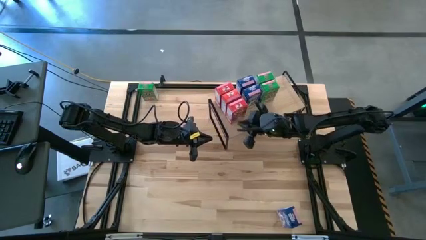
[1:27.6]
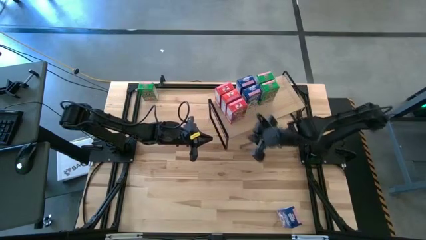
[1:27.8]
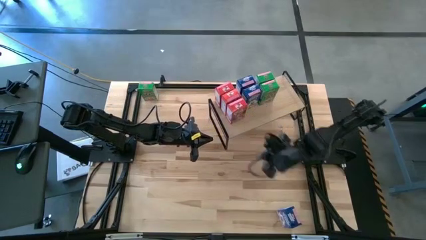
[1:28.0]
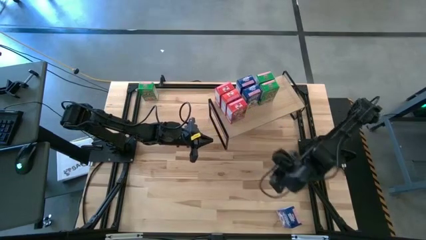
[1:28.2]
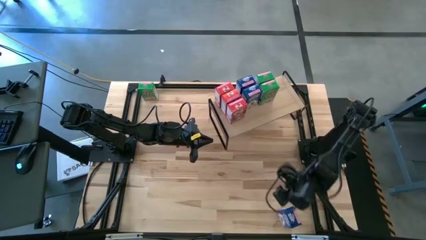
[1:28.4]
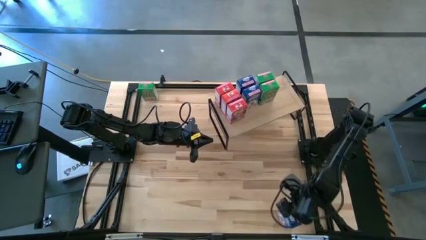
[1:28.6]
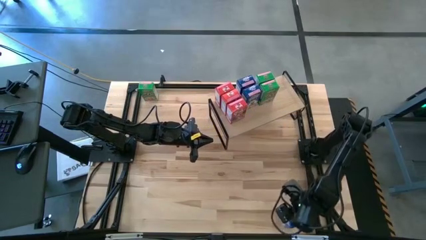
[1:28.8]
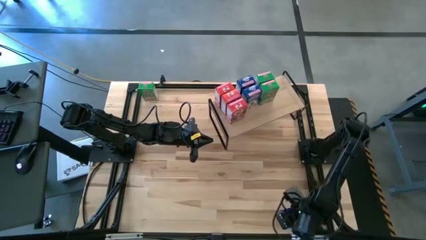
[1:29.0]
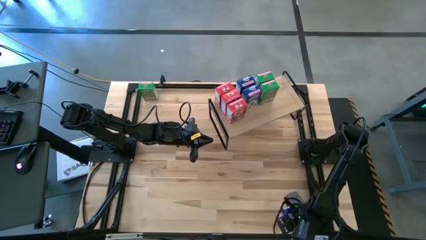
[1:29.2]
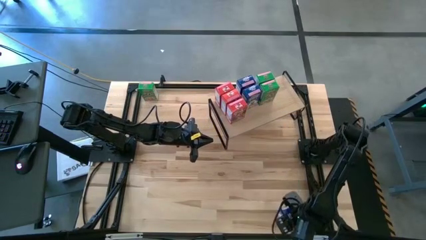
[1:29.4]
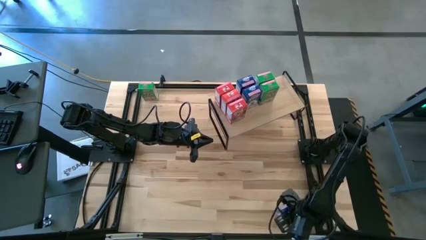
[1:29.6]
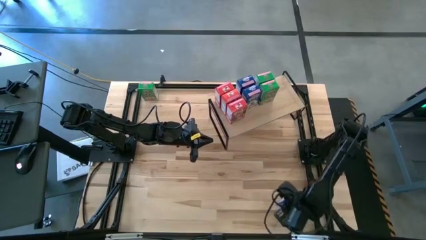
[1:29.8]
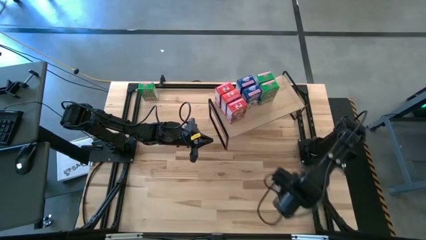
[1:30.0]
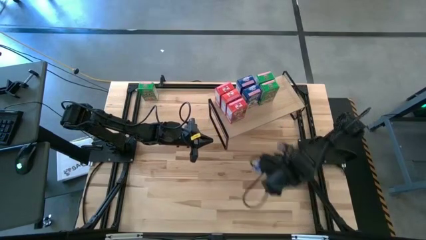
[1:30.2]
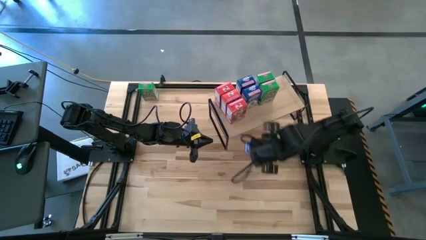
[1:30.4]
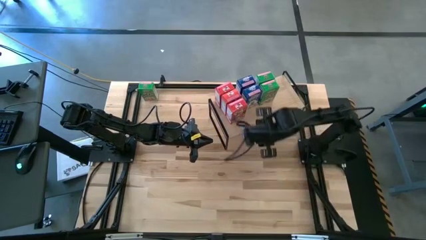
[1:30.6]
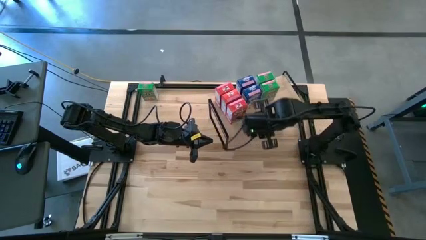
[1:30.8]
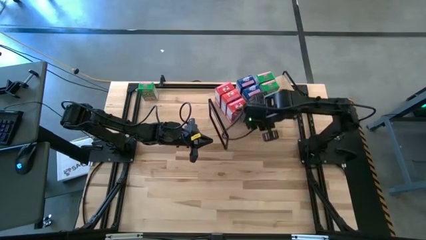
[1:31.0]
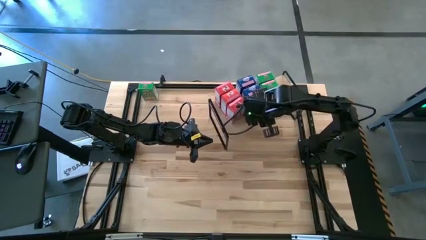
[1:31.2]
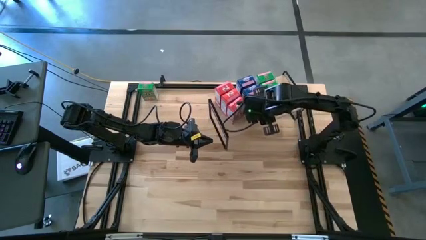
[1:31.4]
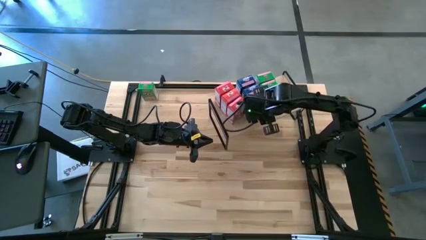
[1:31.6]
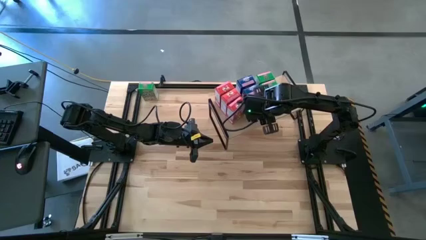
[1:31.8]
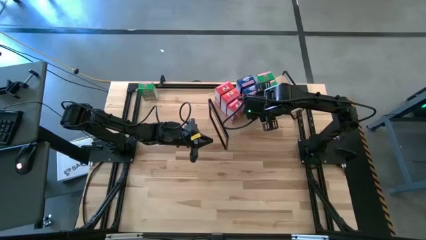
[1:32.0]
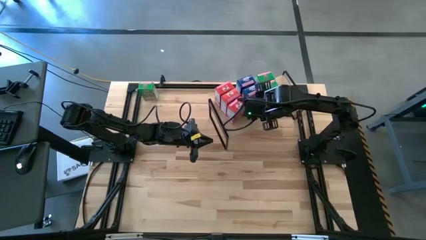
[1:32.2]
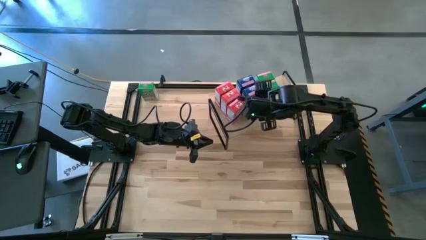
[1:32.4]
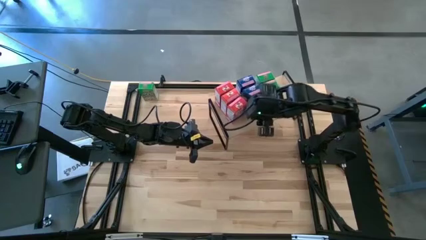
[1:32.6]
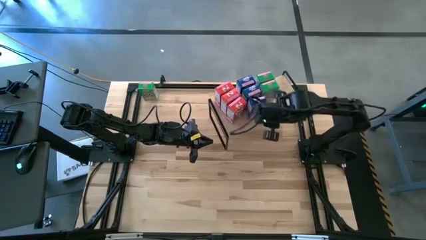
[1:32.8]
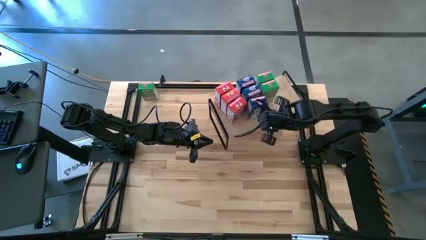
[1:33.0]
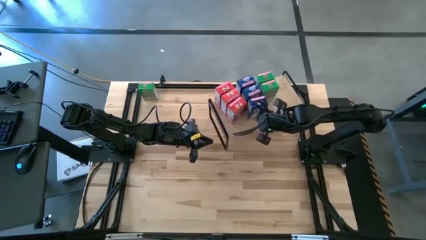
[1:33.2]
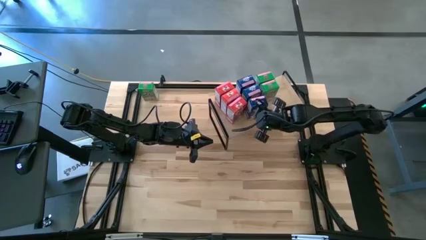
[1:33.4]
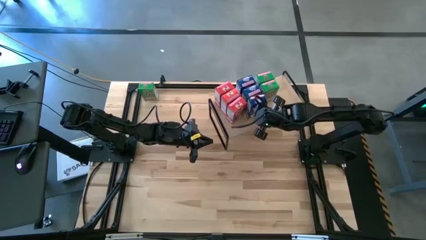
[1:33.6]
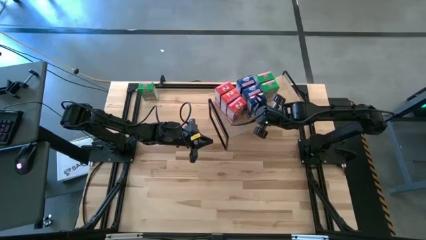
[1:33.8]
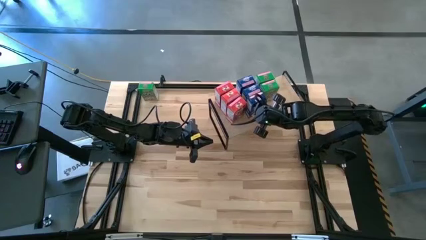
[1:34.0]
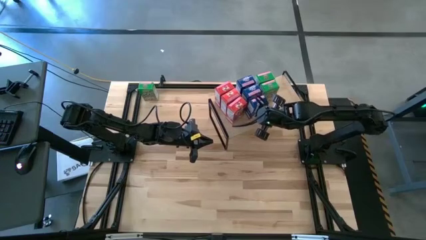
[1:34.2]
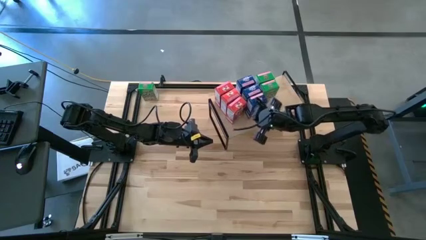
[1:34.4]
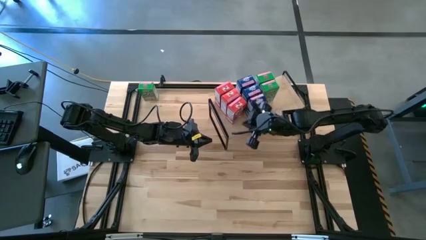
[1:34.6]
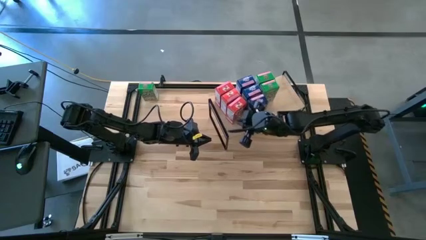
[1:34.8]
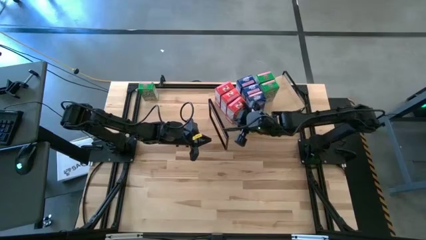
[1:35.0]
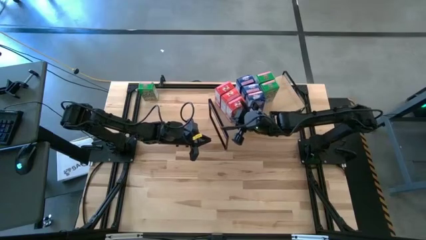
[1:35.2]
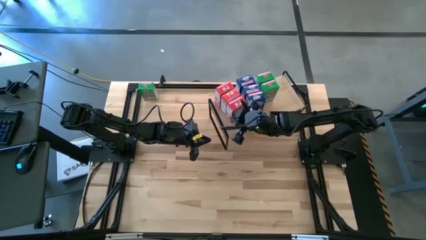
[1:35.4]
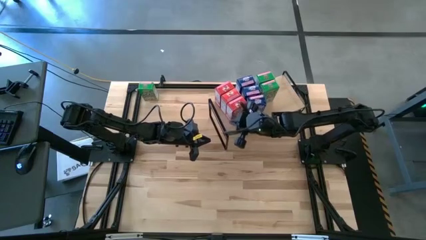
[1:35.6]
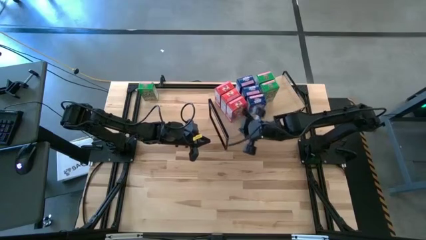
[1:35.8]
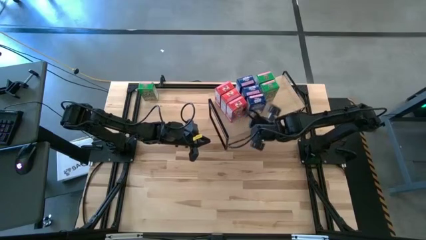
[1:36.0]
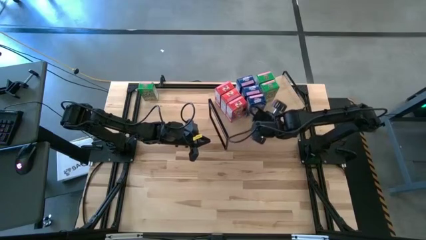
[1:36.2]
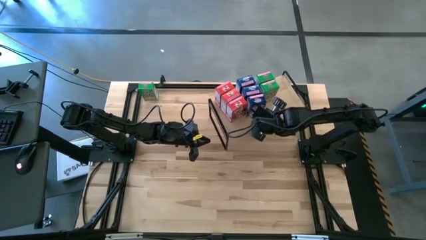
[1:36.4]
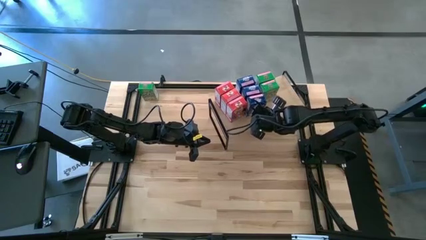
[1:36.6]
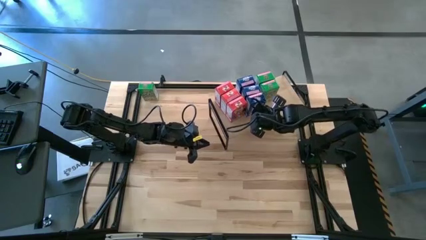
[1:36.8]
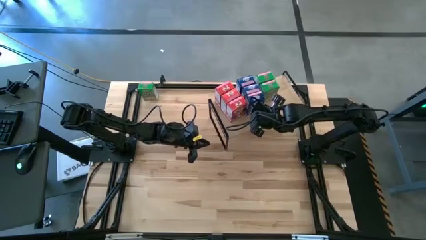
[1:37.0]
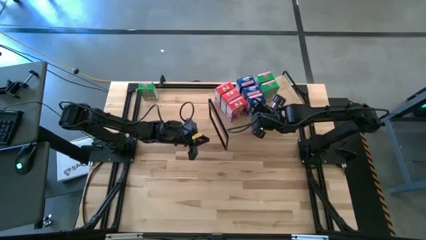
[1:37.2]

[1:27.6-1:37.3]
Task: Stack cereal on shelf
Put the blue cereal box on the shelf aligned with the blue cereal box

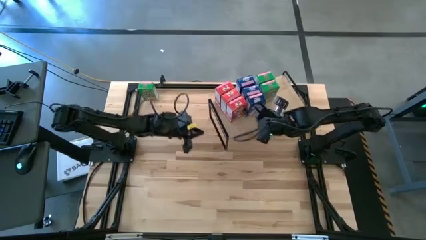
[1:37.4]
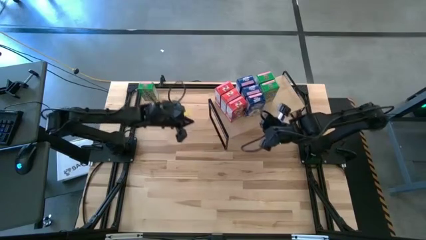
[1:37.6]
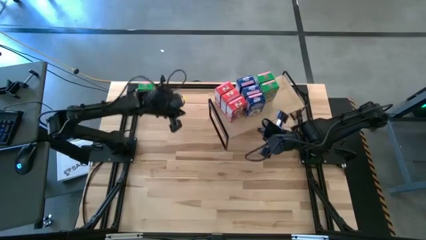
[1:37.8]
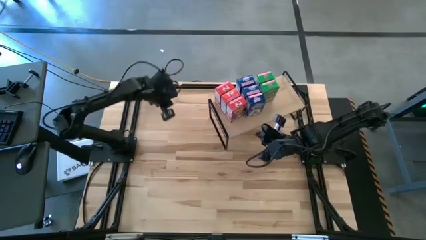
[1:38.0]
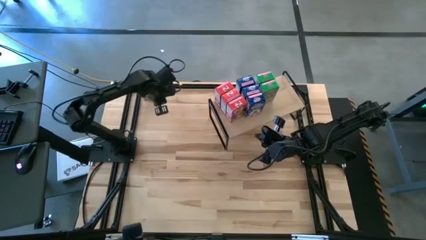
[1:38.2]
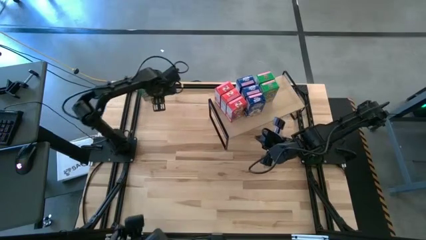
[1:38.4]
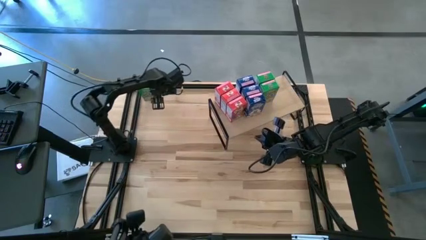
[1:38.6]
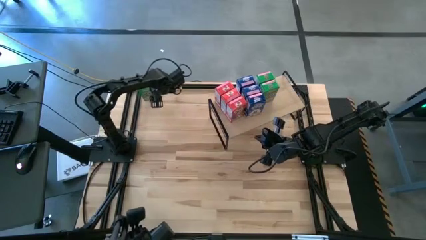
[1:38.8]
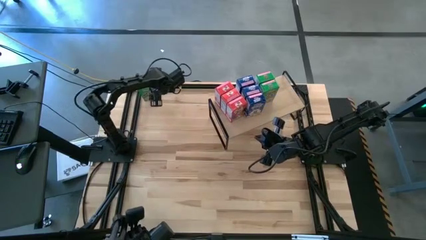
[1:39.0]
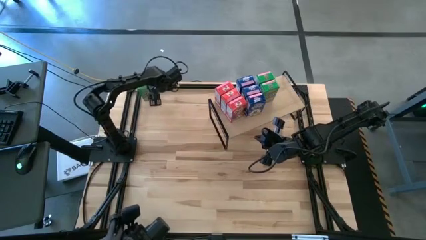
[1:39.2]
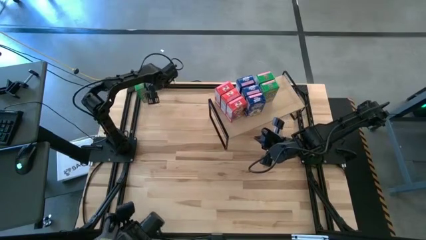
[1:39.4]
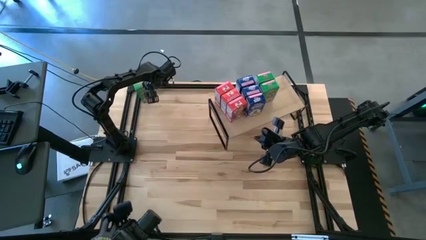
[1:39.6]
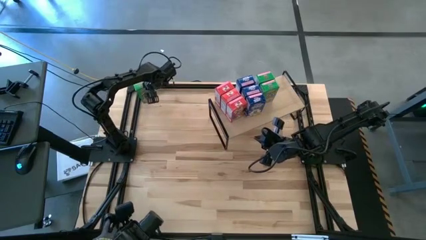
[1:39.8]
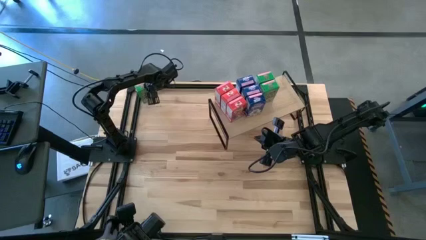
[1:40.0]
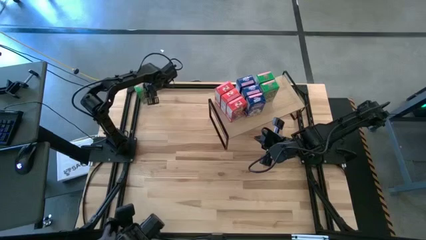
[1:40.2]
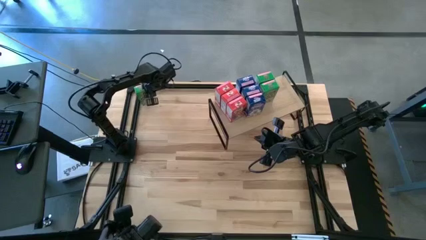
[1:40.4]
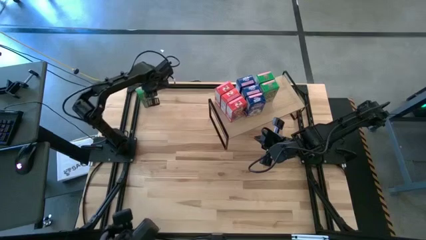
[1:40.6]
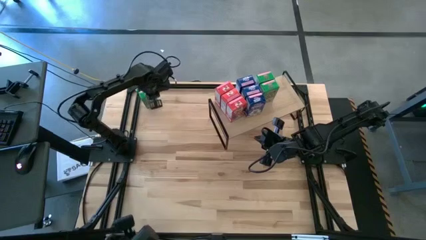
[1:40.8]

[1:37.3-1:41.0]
Put the green cereal box on the shelf aligned with the green cereal box

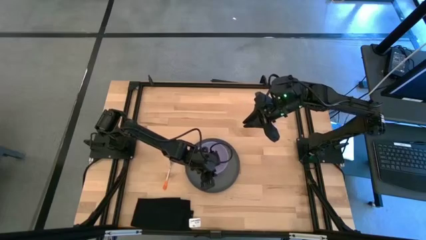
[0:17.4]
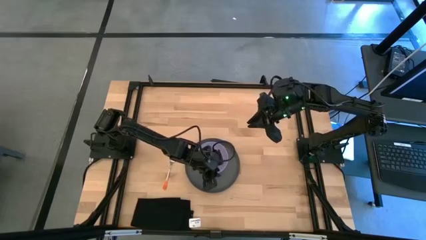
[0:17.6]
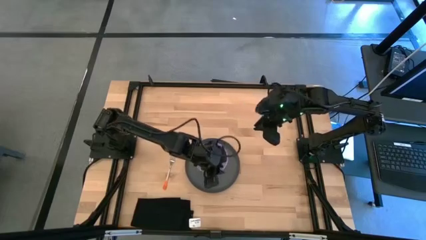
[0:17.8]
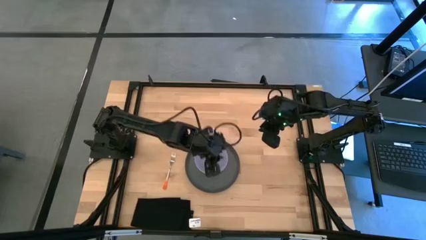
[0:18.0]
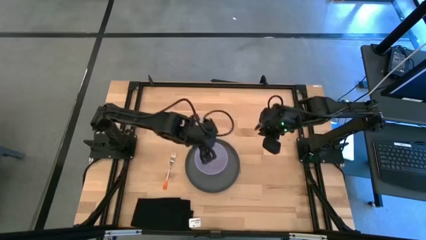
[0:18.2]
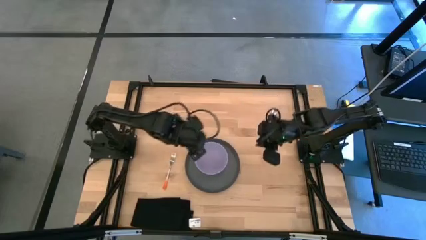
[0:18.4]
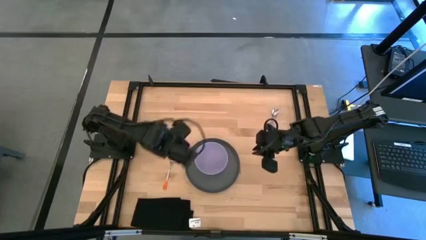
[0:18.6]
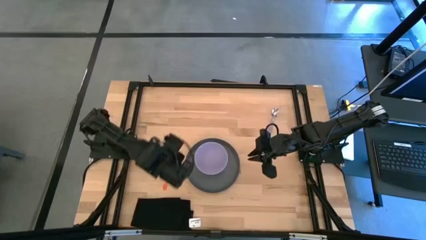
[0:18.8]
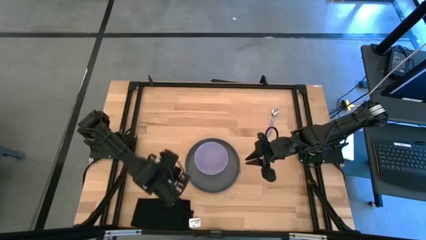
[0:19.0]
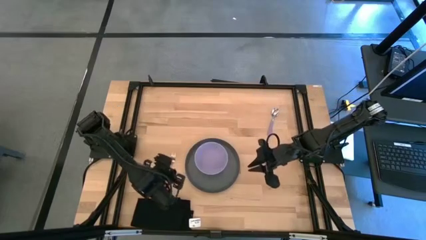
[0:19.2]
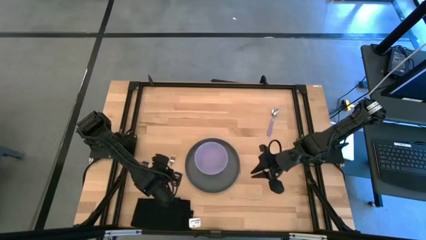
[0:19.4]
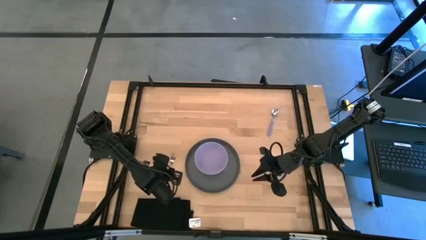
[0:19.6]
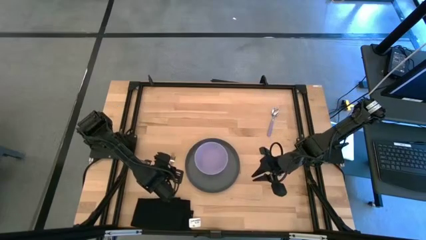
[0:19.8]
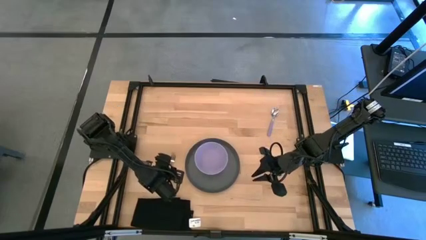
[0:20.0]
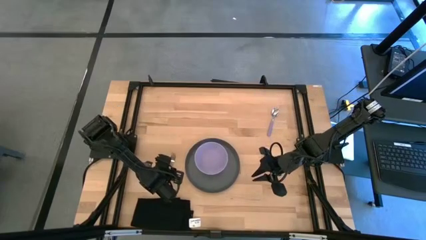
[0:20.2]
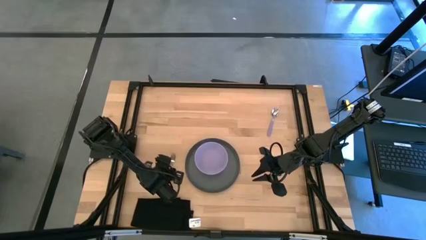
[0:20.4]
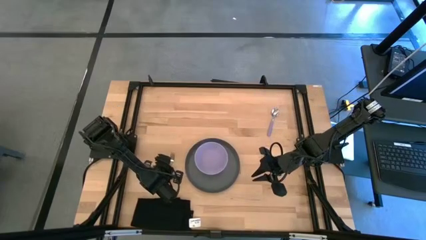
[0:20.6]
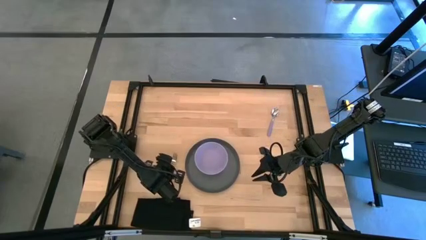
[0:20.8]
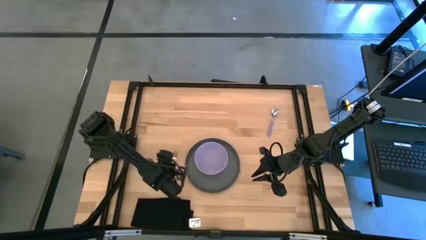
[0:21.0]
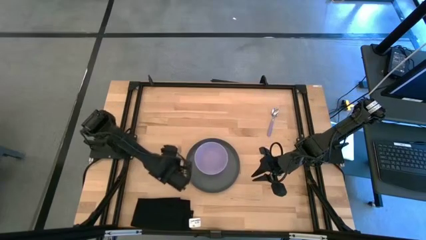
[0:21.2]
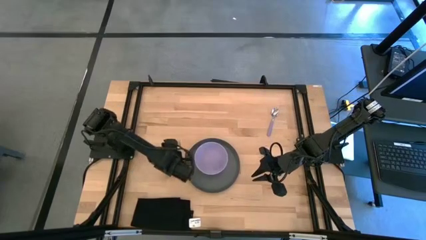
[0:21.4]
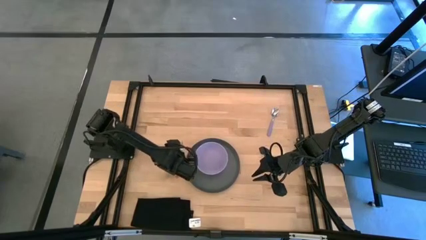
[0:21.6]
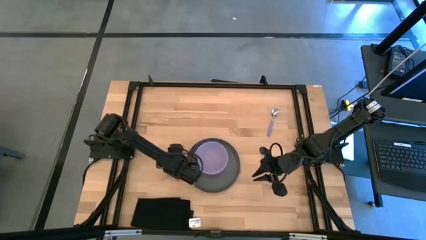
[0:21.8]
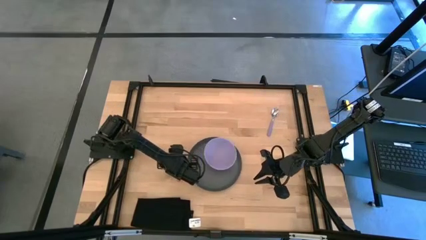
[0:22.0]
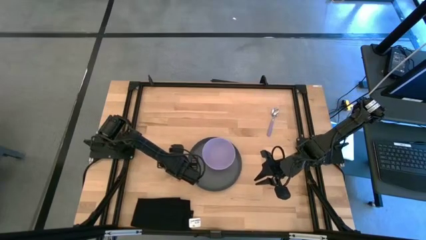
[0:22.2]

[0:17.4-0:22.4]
Task: Set table place
Put the orange fork on the table to the left side of the grey plate
